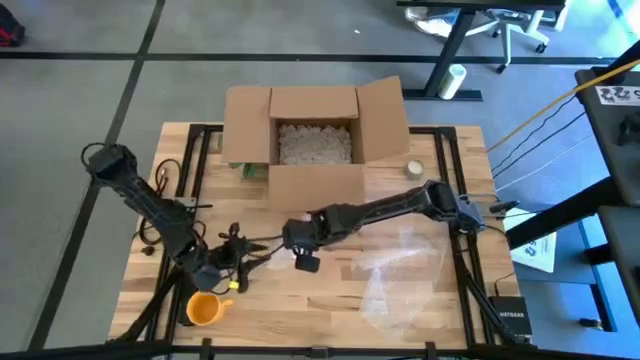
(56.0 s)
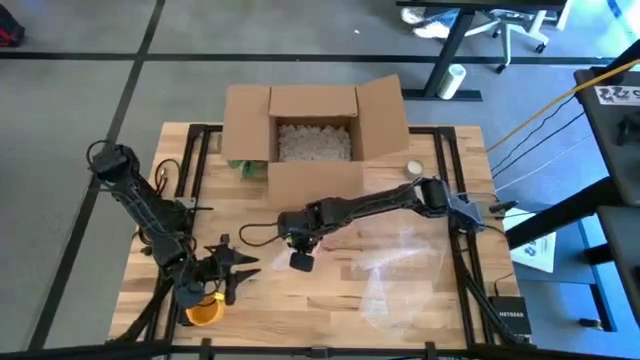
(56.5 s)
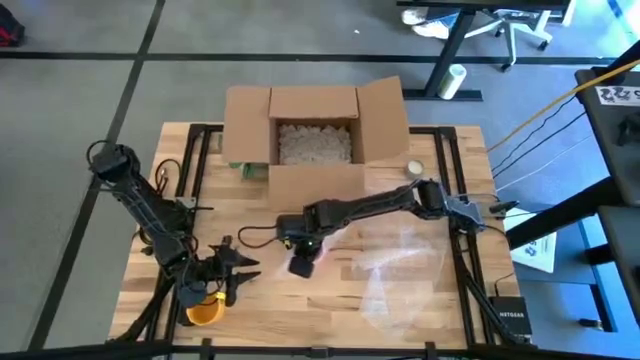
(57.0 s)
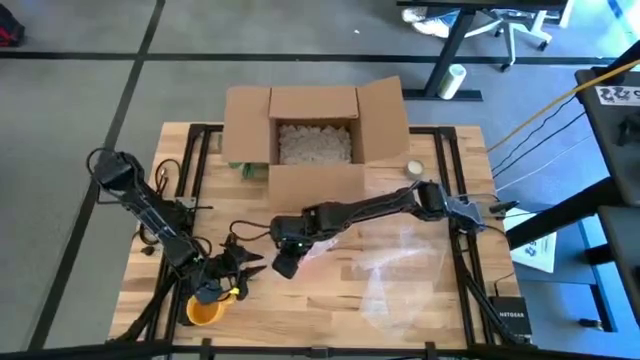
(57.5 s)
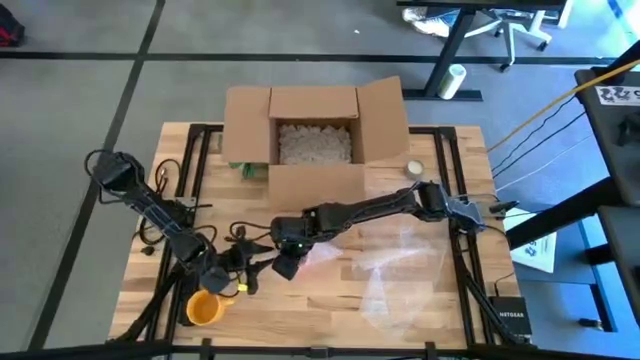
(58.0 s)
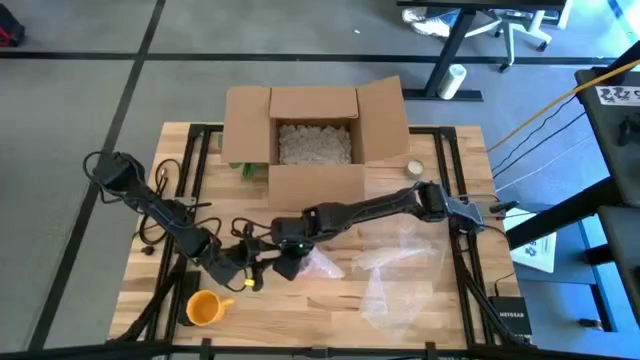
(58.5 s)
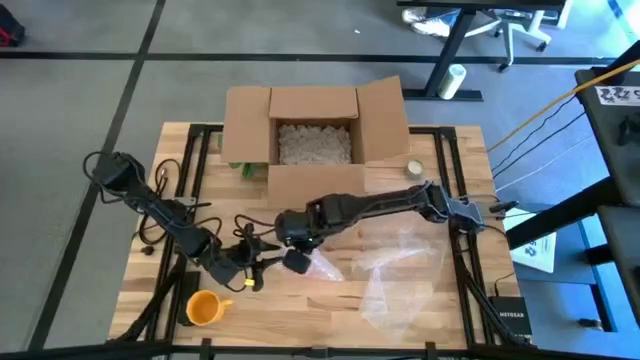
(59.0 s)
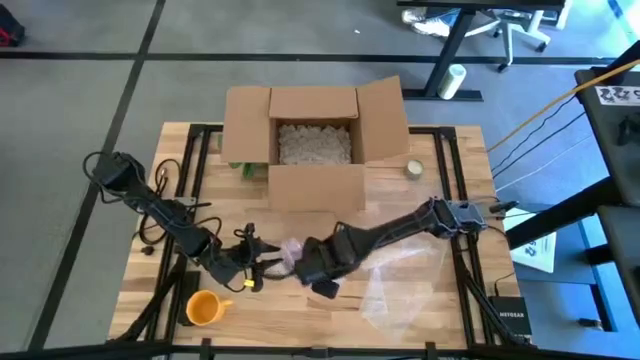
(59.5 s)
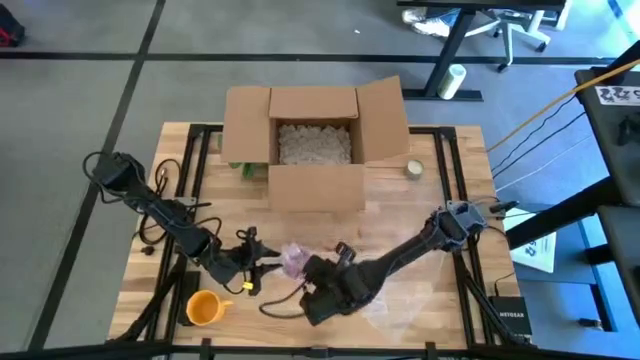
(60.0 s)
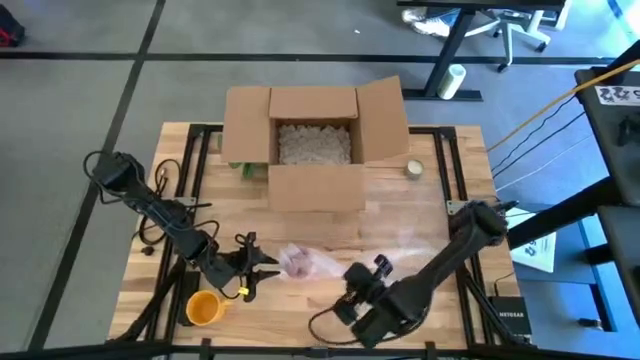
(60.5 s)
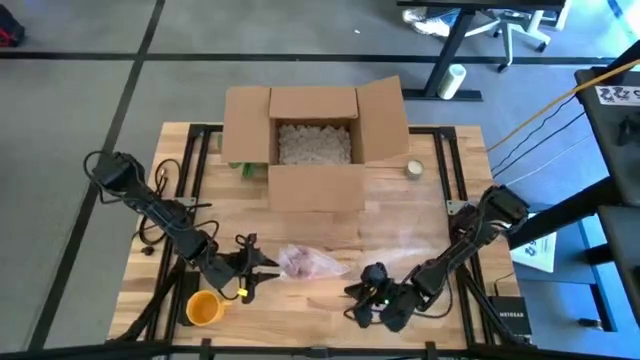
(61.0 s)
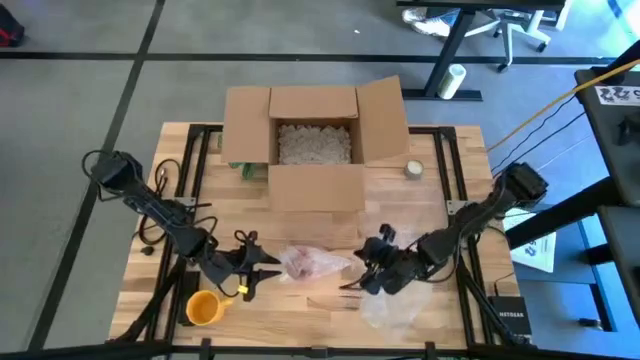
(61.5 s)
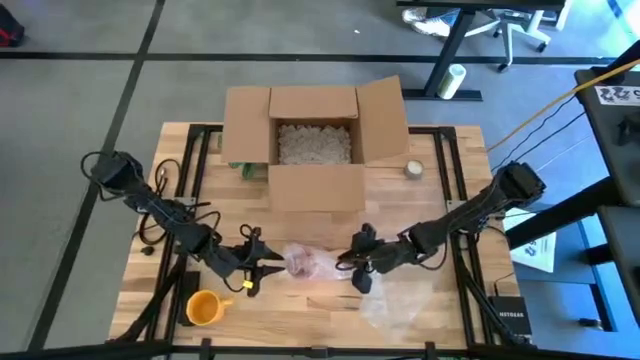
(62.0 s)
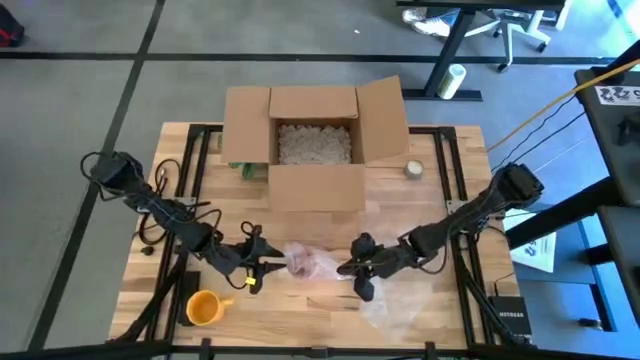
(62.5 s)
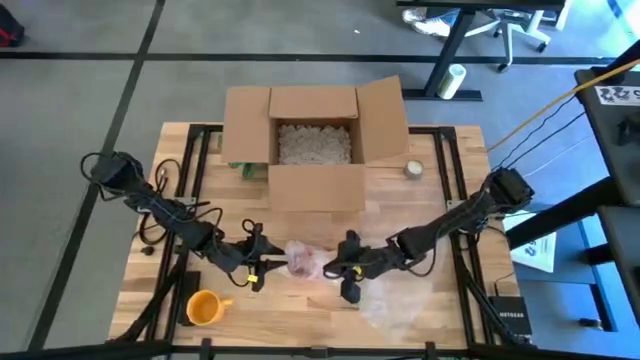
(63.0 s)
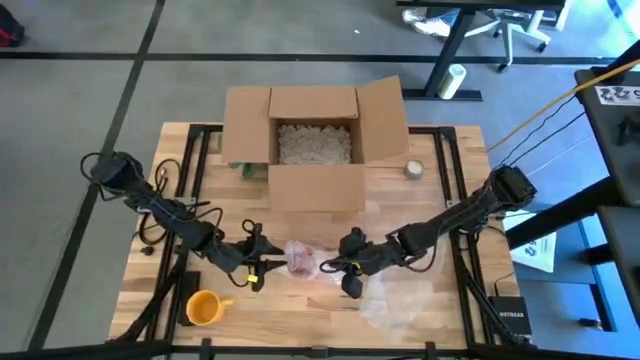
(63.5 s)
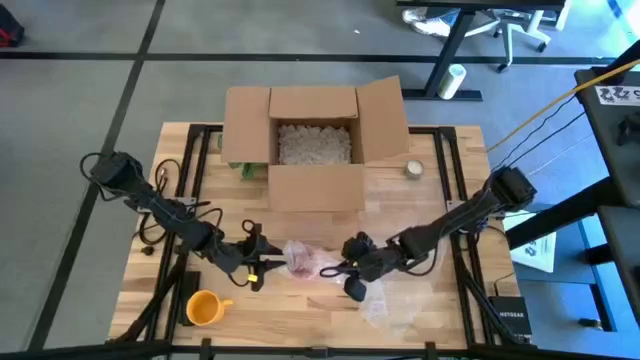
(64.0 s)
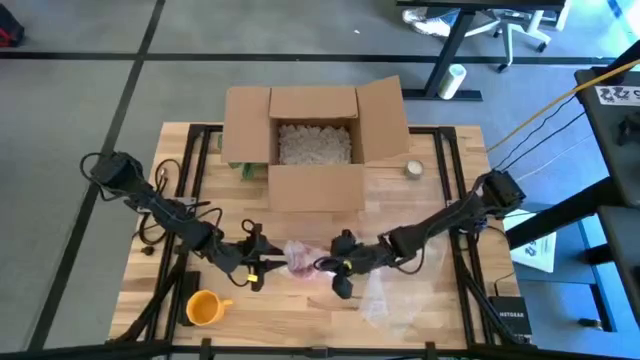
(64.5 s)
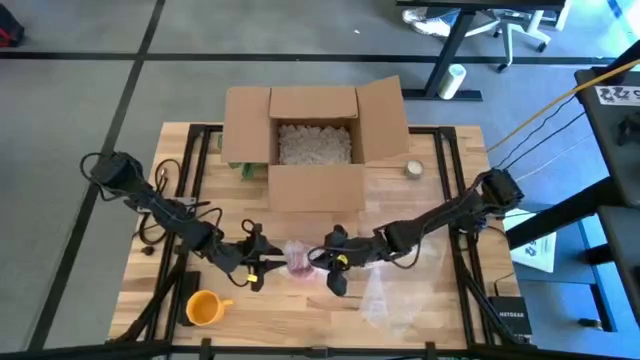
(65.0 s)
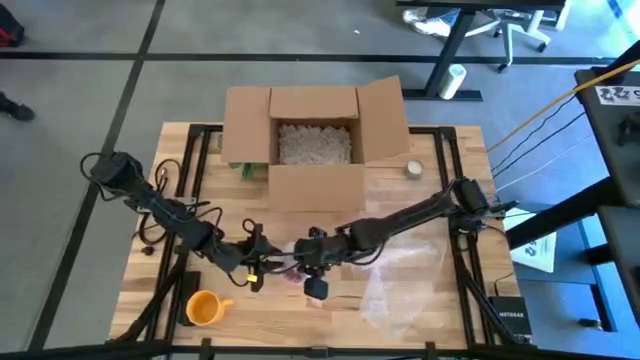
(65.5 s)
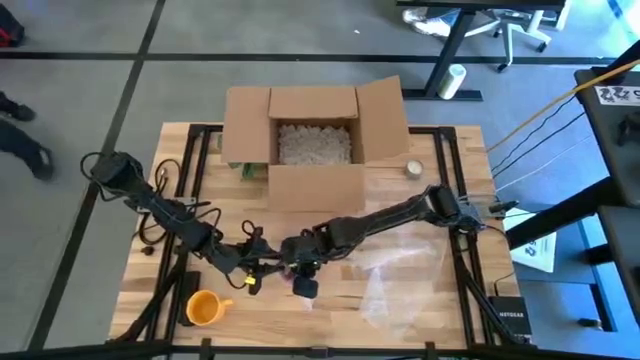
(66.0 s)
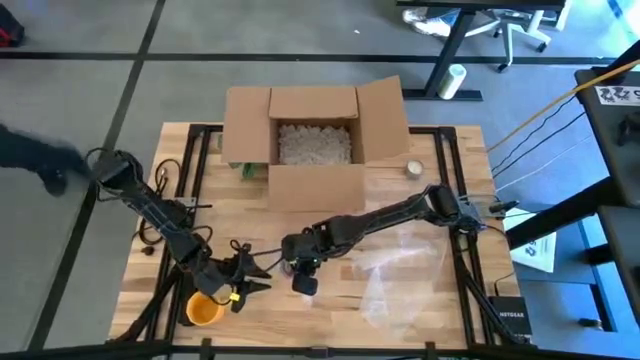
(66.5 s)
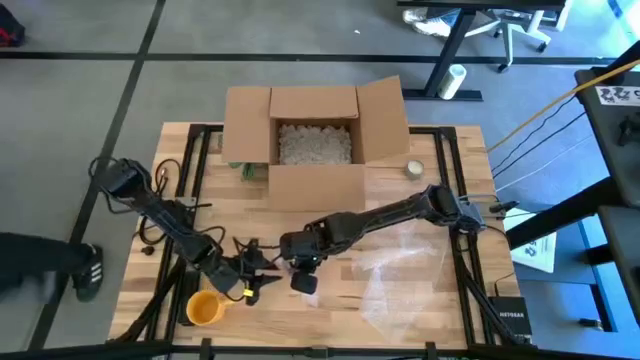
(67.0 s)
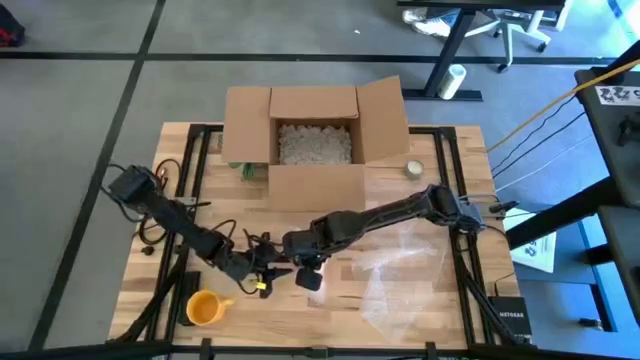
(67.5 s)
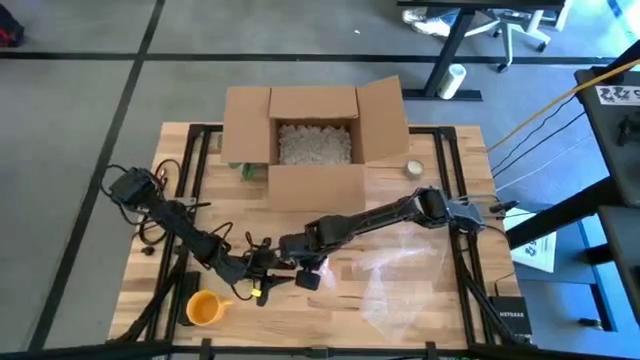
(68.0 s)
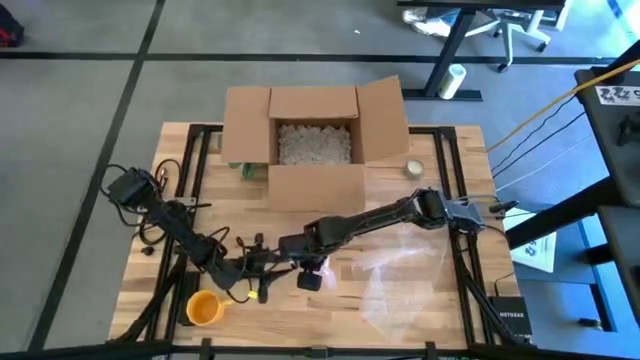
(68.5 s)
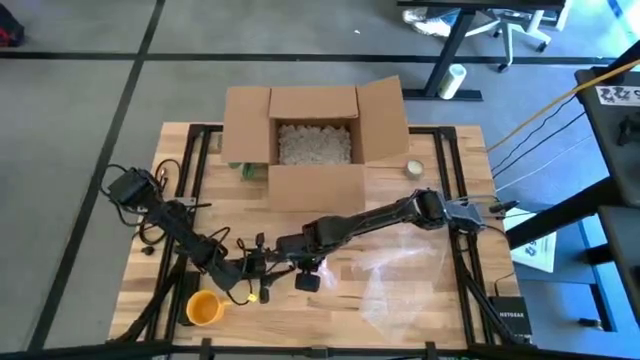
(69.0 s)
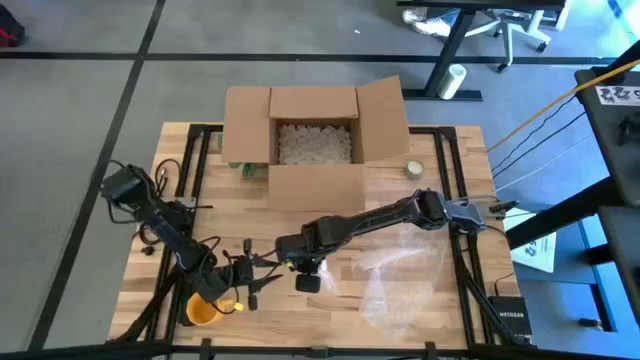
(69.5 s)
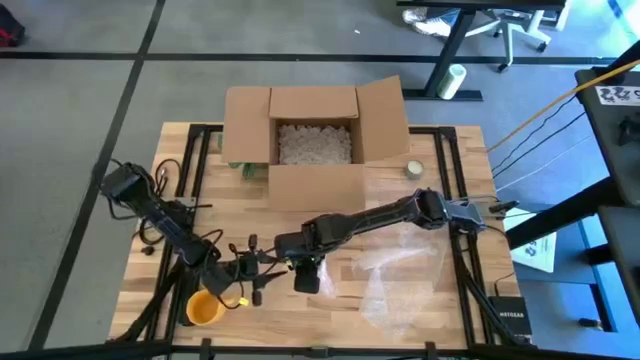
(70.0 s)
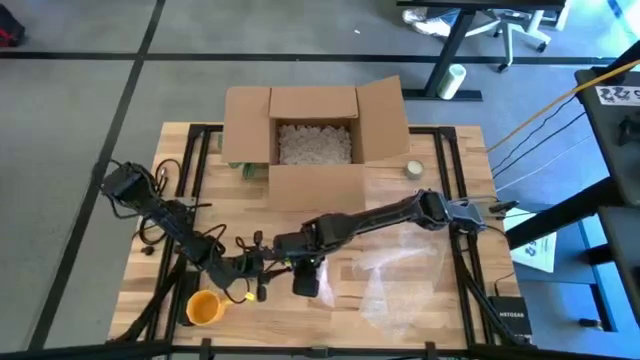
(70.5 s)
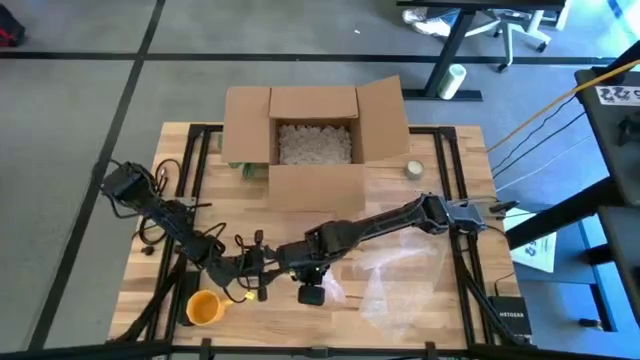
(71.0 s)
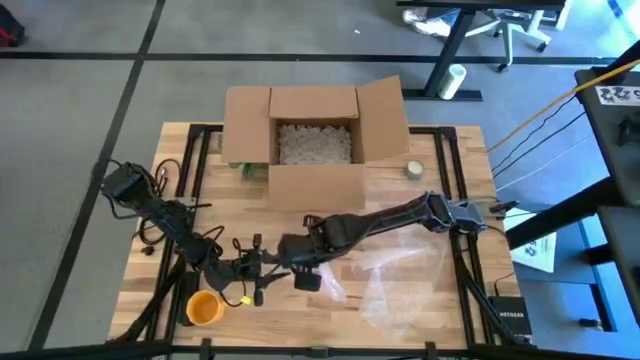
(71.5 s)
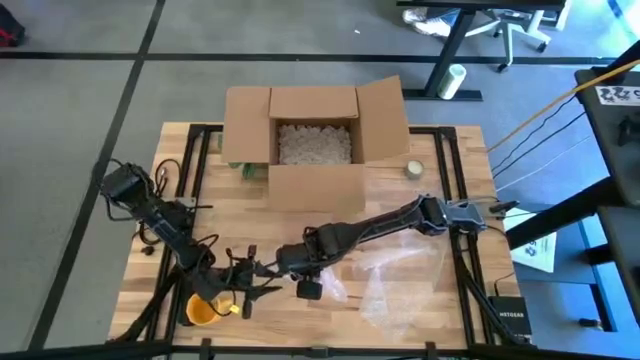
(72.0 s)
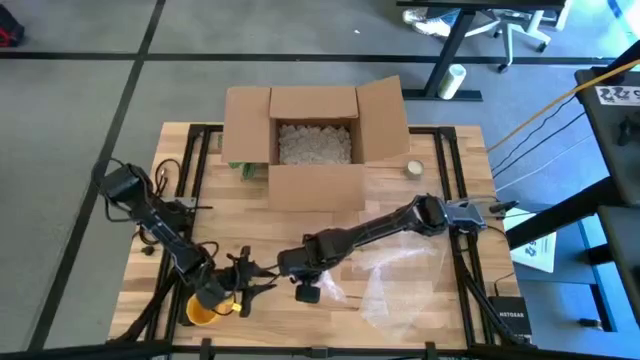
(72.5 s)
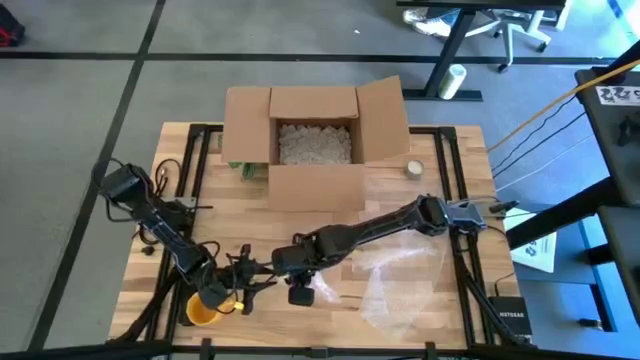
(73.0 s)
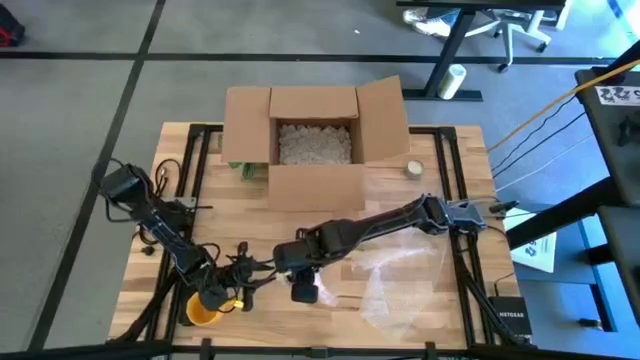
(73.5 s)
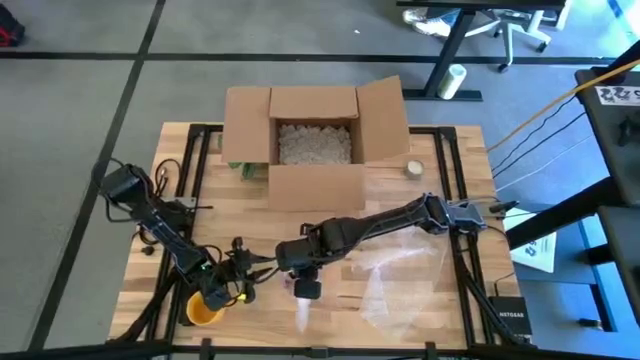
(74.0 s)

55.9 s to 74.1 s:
Task: wrap mug
Wrap the red mug with bubble wrap

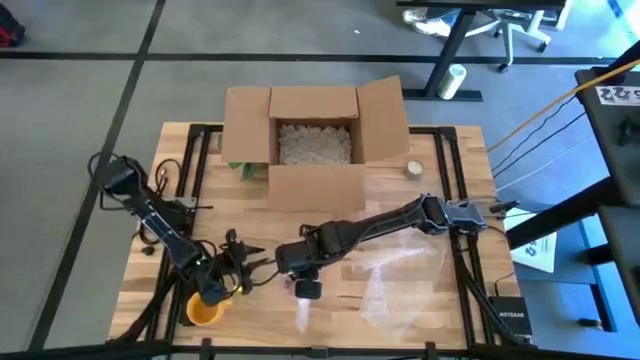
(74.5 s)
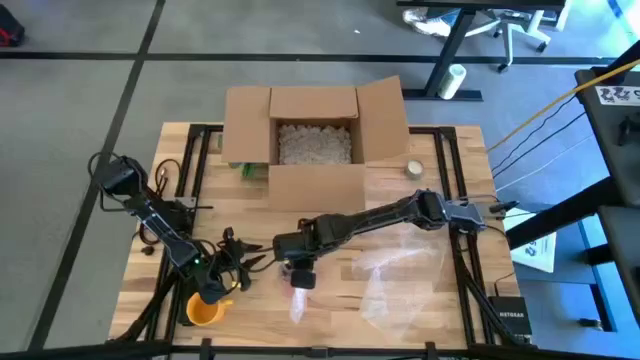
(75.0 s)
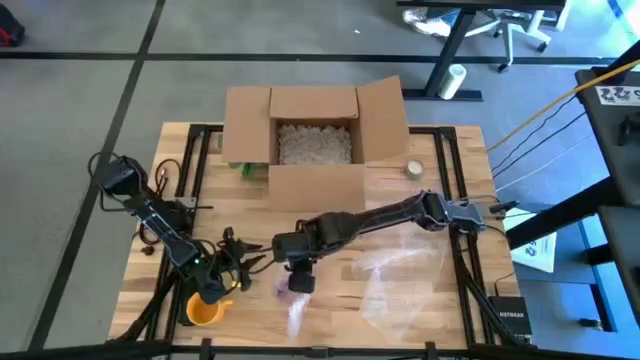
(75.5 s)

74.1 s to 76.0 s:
Put the wrapped red cup into the cardboard box

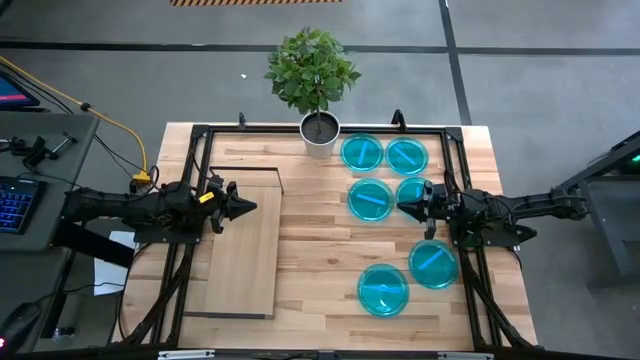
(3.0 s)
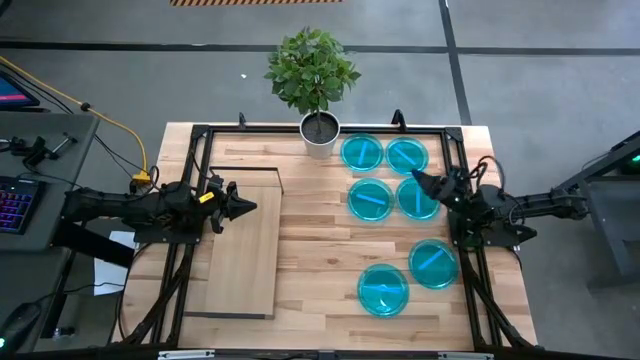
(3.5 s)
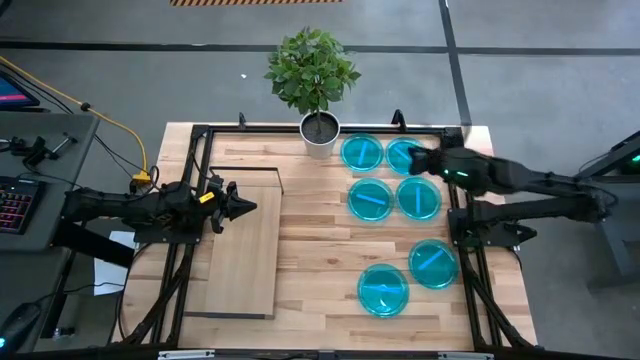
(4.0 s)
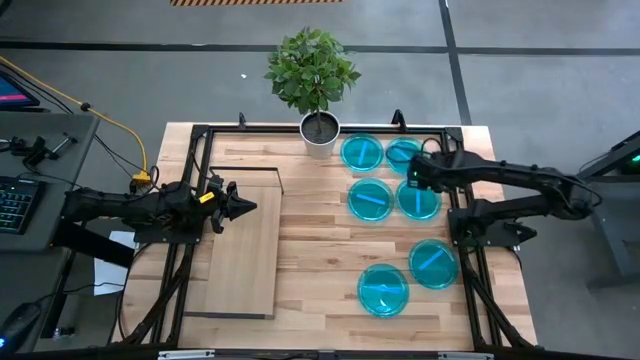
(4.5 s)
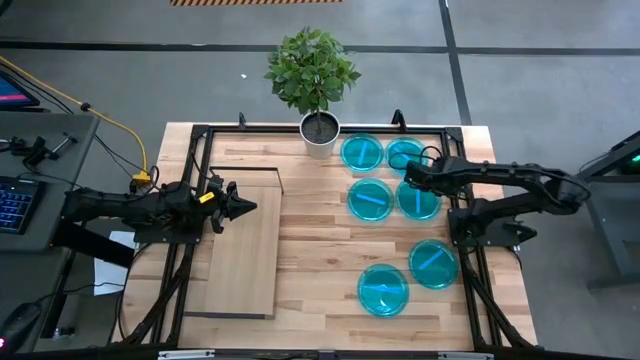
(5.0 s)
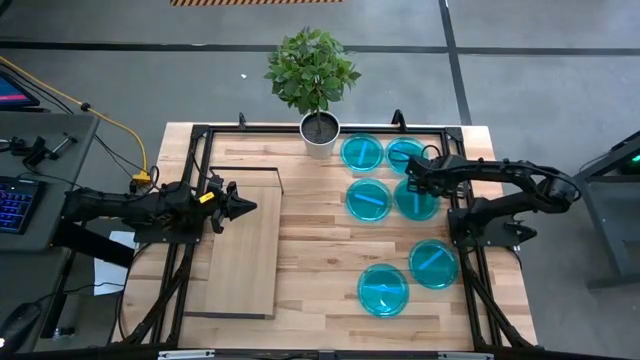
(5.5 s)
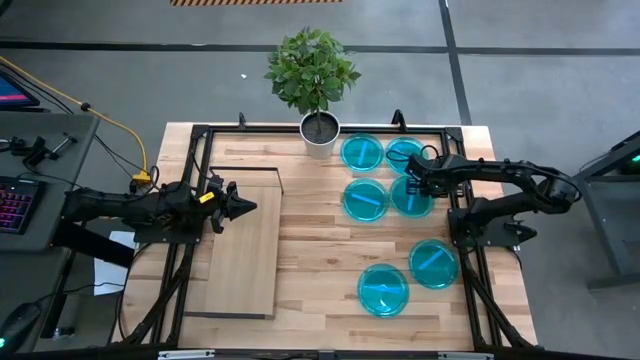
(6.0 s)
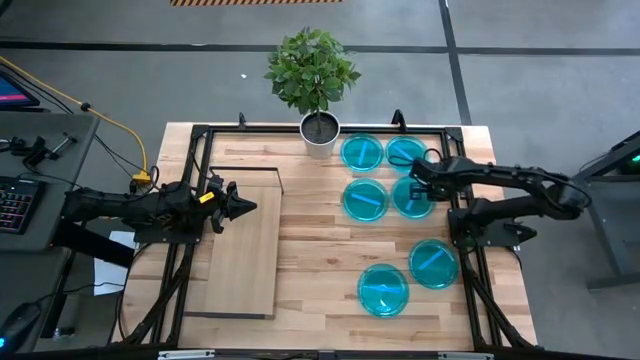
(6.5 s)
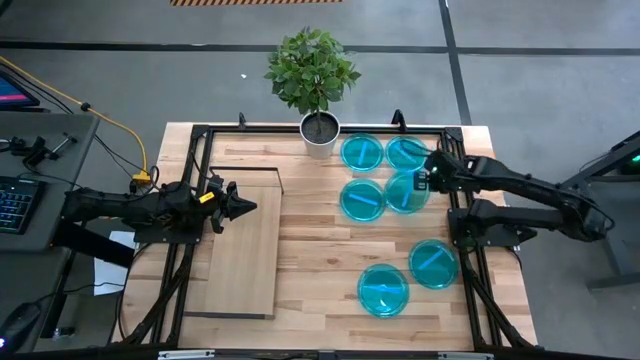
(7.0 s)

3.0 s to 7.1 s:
Task: Place and stack plates onto a shelf
Put the middle right blue plate on the shelf
